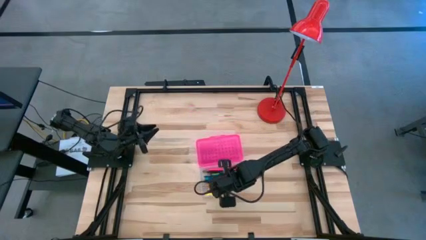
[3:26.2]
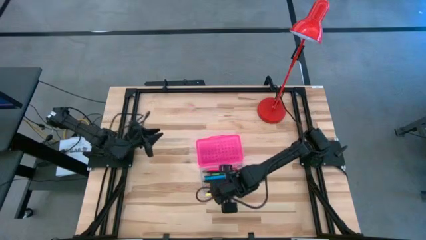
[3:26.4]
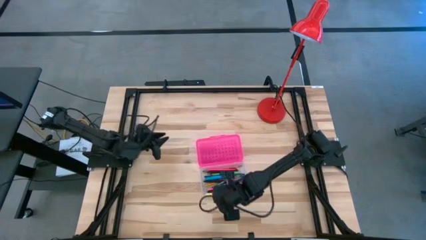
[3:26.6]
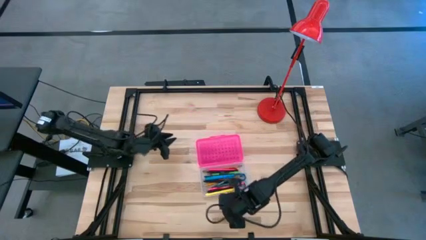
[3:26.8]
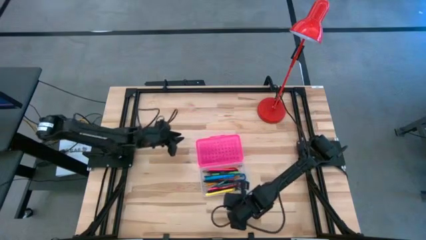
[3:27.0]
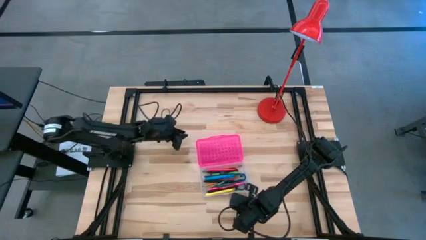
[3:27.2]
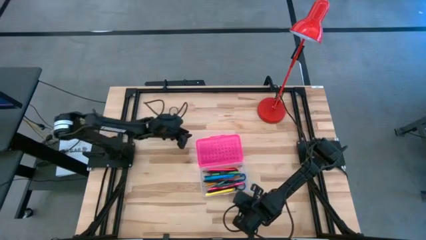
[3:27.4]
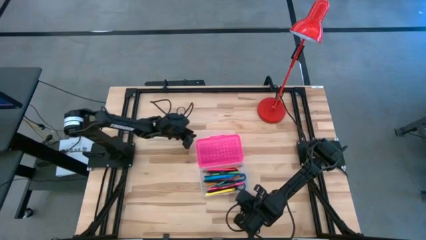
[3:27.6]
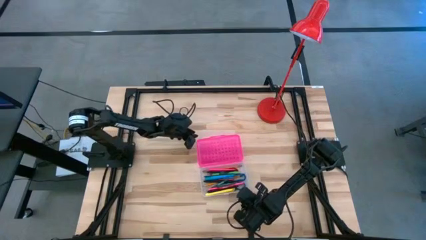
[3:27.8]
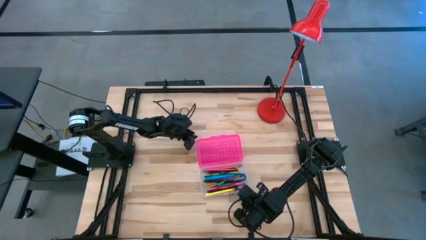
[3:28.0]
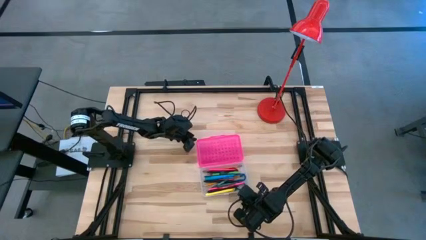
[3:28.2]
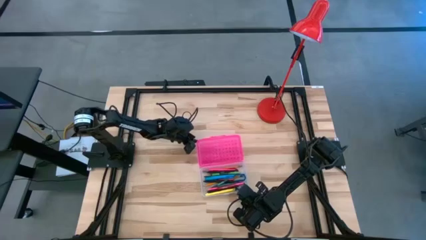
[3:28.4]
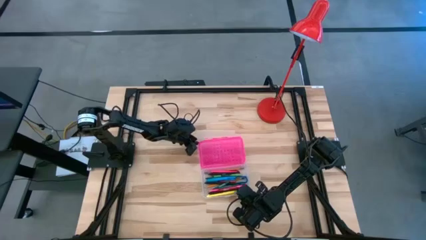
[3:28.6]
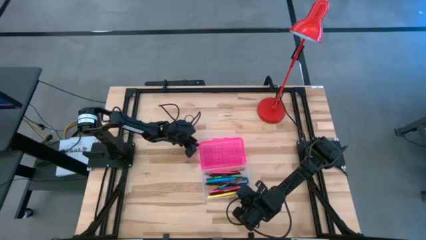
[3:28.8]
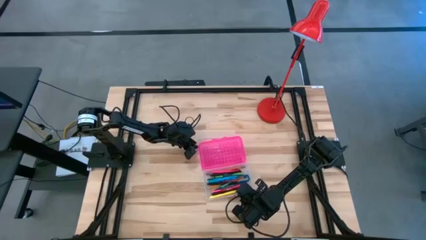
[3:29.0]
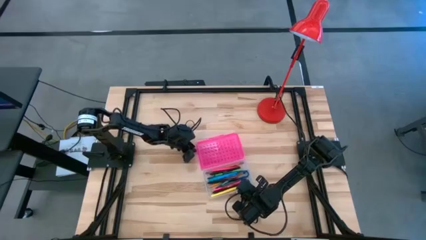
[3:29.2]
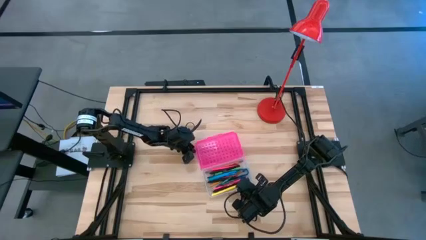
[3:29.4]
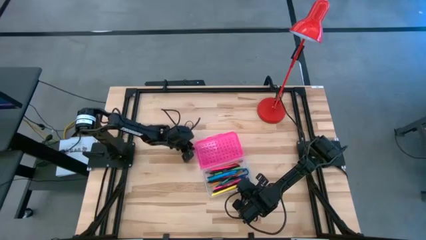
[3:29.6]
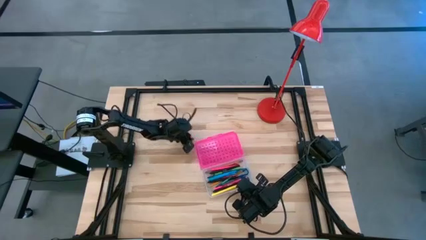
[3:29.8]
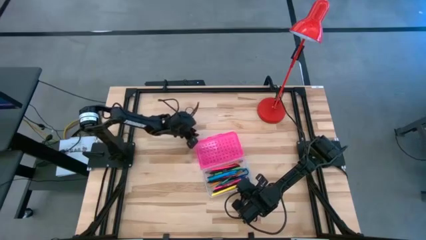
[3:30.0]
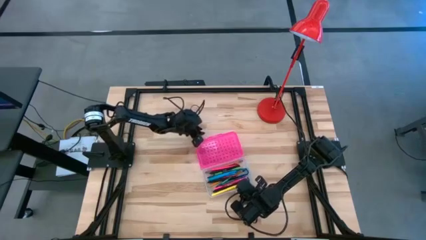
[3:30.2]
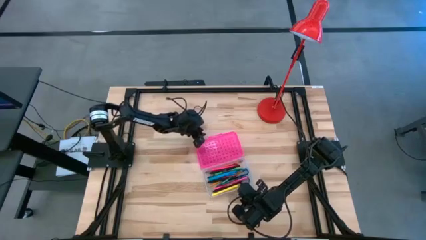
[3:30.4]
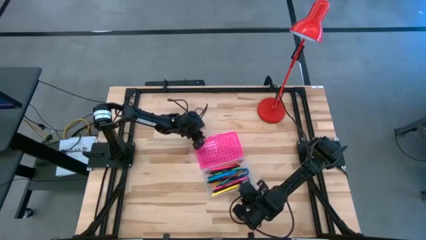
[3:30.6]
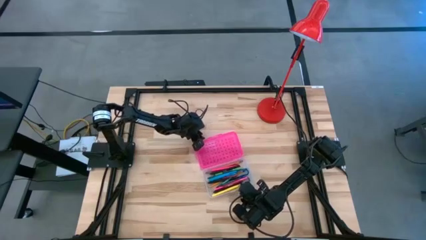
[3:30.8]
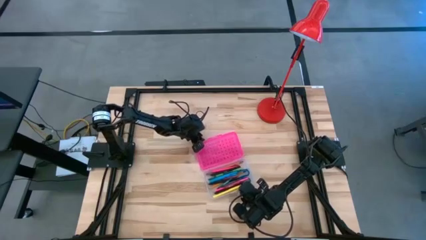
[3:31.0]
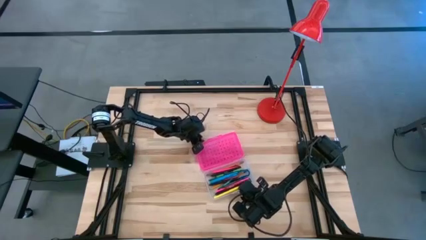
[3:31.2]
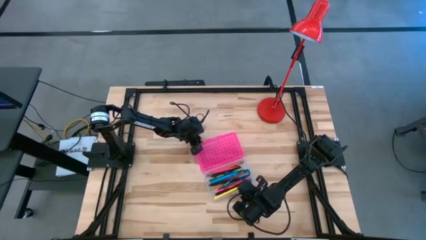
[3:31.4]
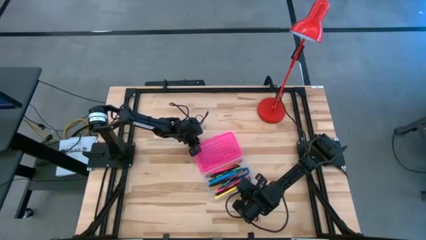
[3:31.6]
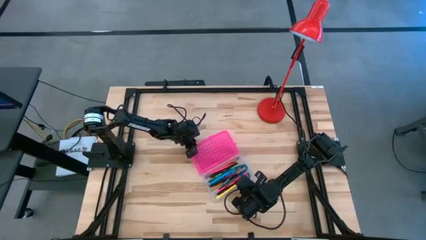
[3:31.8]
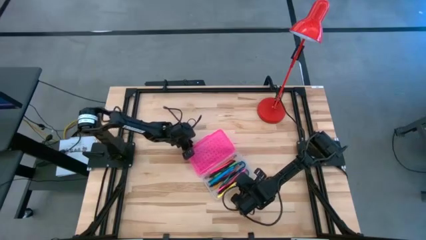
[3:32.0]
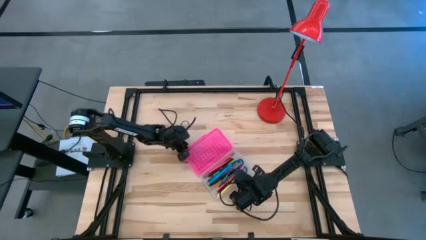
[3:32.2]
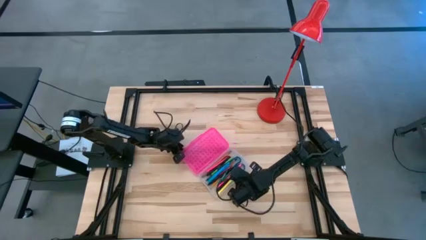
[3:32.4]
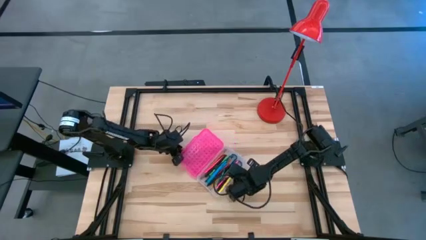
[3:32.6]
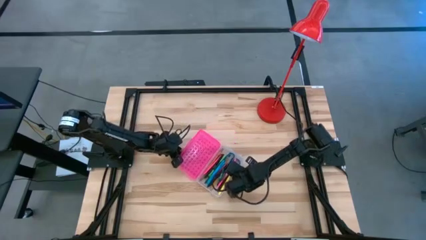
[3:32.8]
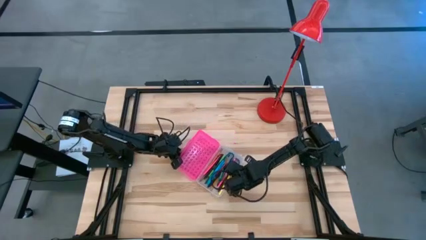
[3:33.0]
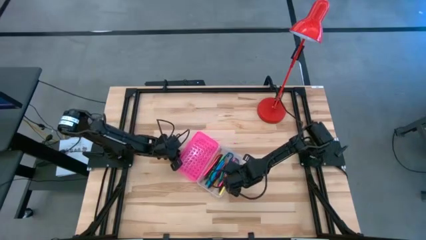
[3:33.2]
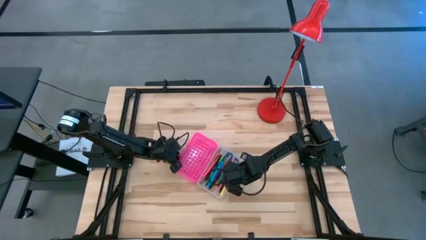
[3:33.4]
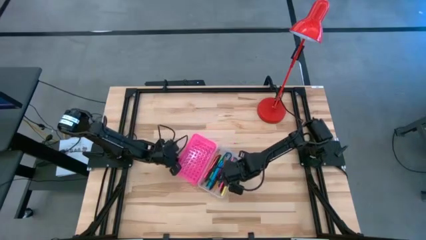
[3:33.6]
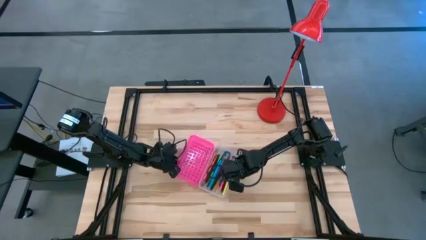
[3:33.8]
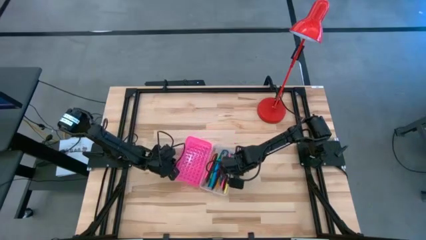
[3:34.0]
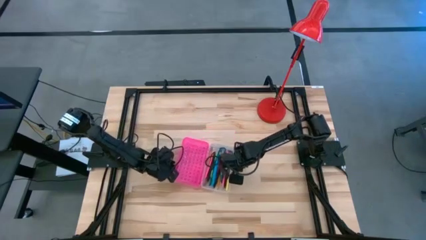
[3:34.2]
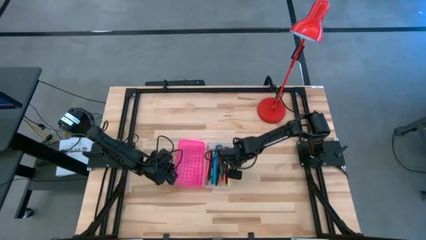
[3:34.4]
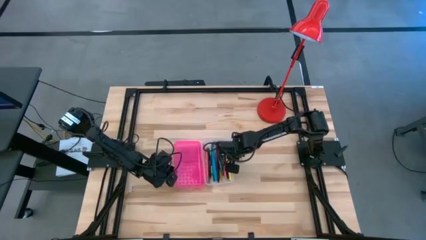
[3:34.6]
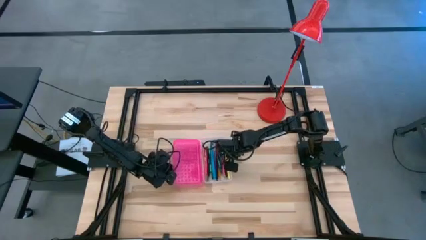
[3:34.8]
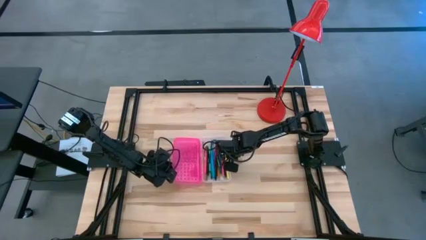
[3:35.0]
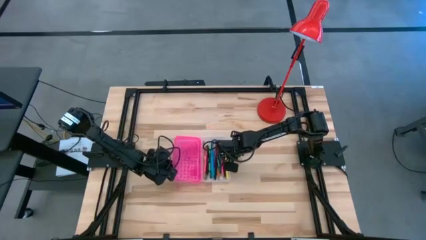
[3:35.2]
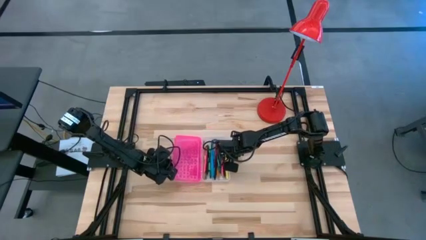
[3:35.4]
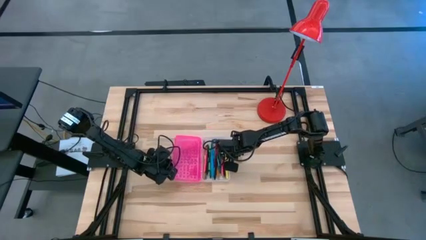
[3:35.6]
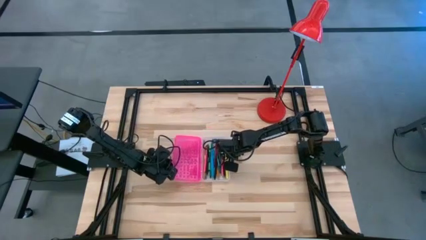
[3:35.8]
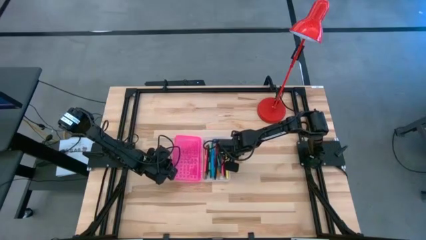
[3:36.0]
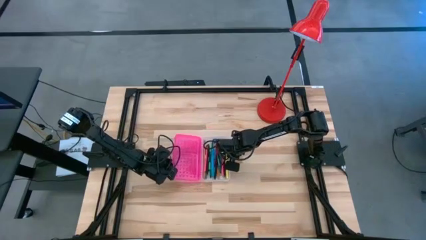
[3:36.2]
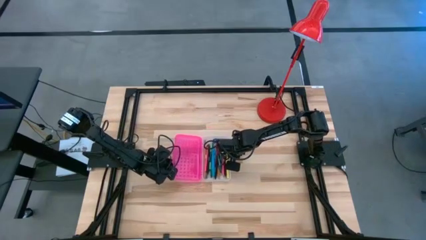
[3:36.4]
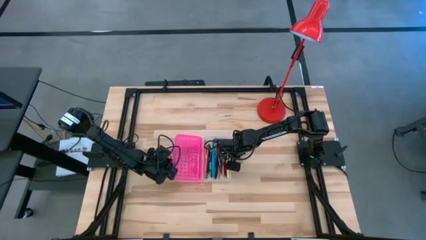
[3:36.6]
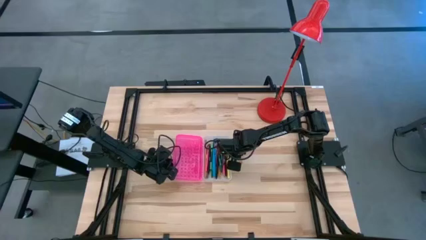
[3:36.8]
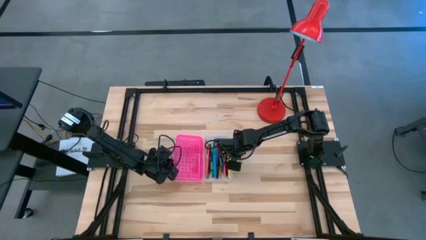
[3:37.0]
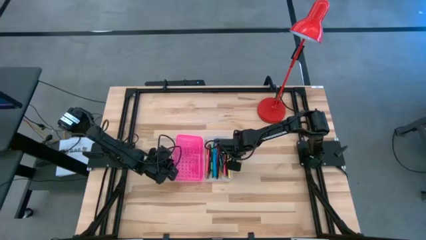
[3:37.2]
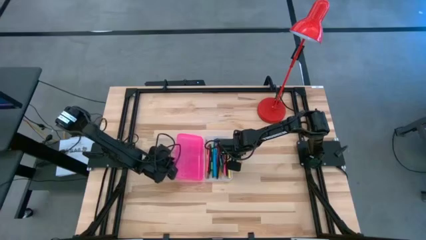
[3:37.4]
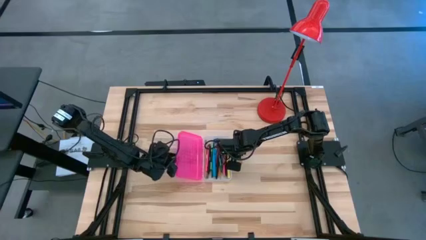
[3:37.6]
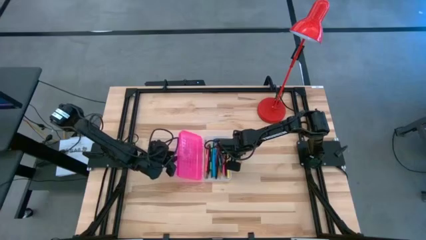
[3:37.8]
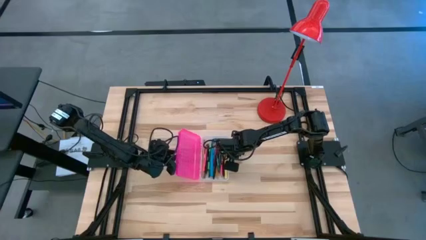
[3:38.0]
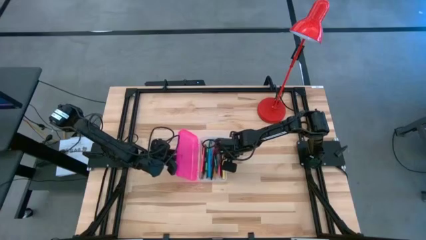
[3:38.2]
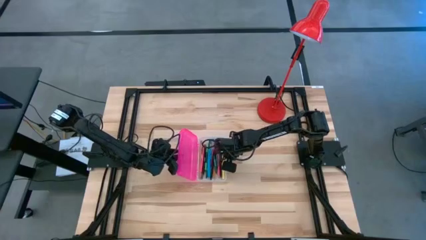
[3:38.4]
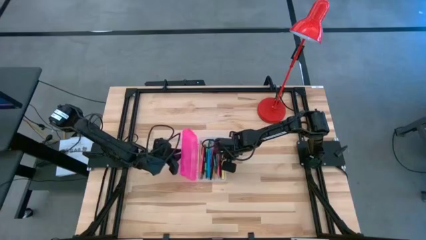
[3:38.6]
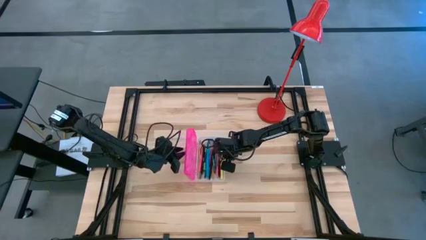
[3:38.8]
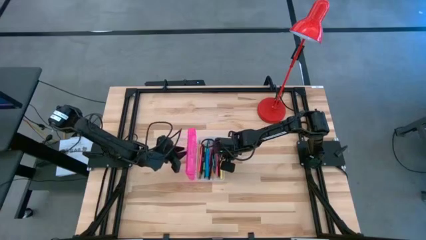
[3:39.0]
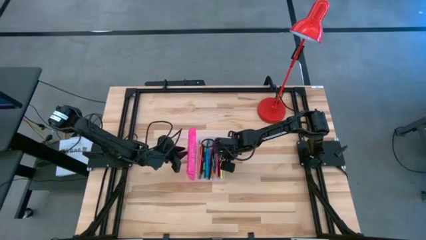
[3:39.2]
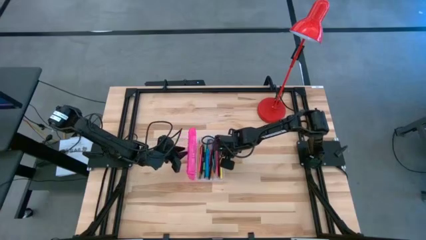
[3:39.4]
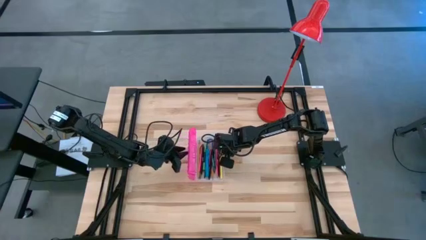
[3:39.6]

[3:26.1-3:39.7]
Task: Pick & place school supplies into a supply box
Close the pink supply box

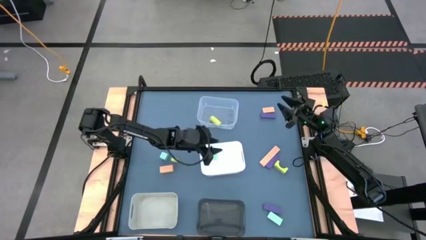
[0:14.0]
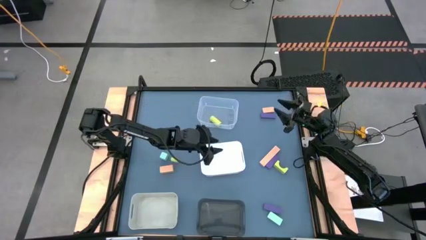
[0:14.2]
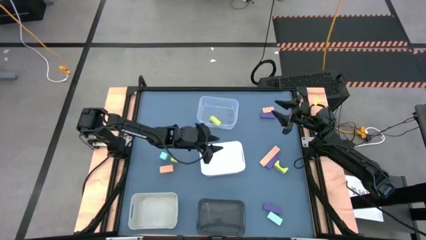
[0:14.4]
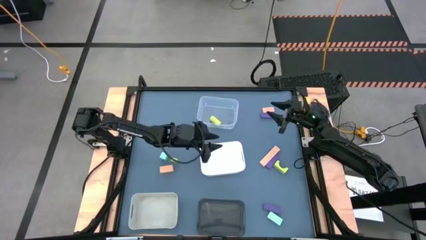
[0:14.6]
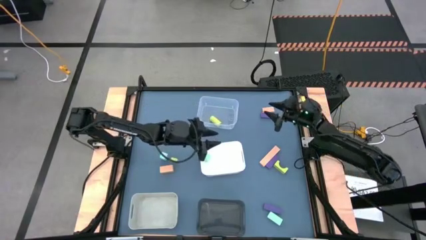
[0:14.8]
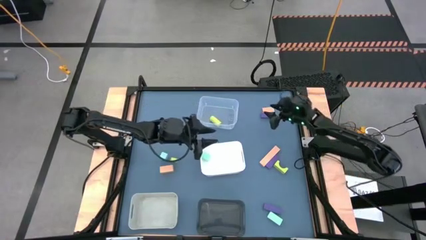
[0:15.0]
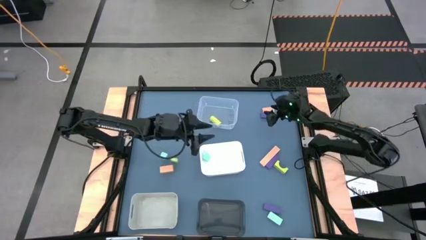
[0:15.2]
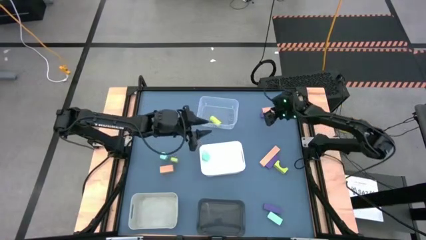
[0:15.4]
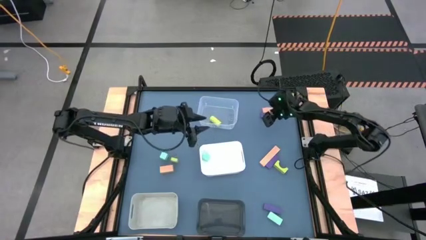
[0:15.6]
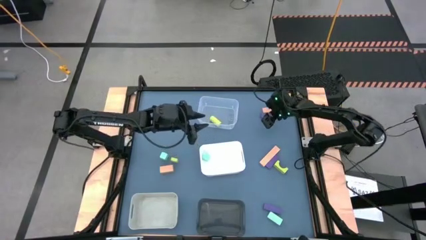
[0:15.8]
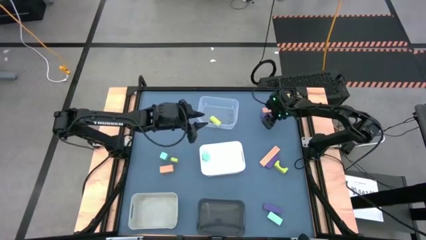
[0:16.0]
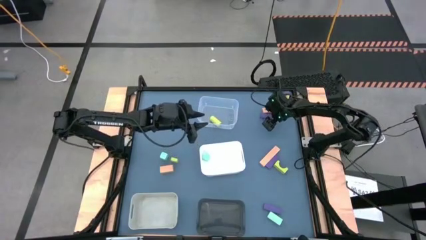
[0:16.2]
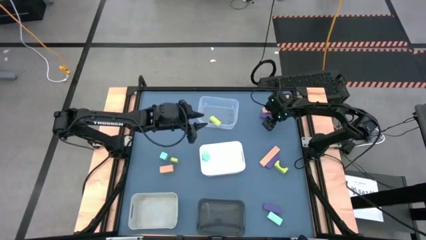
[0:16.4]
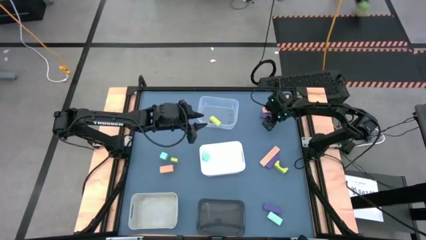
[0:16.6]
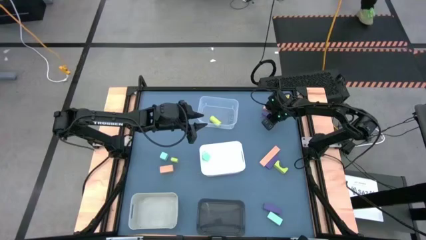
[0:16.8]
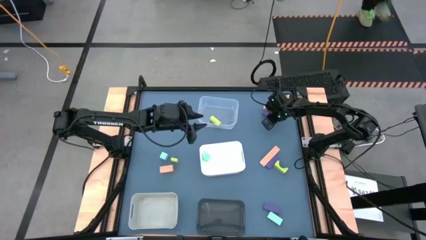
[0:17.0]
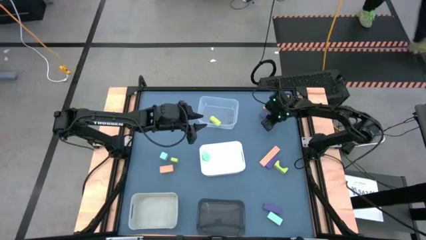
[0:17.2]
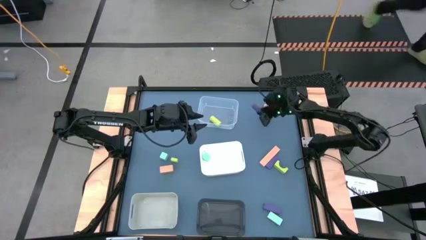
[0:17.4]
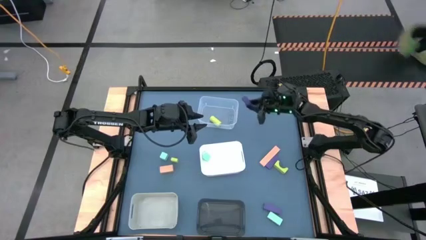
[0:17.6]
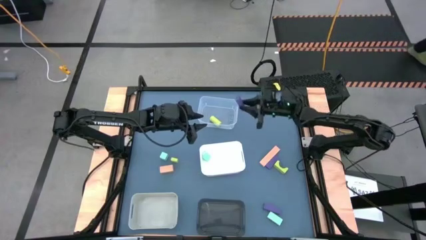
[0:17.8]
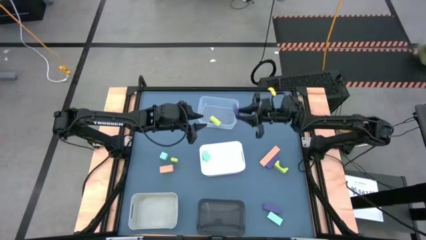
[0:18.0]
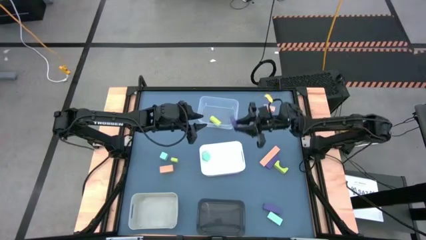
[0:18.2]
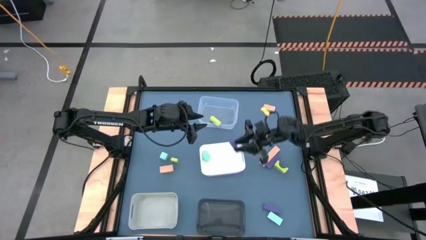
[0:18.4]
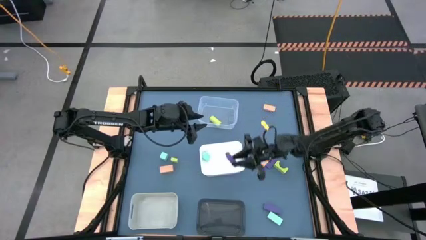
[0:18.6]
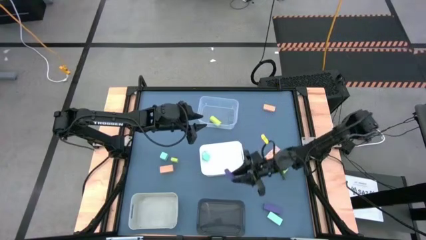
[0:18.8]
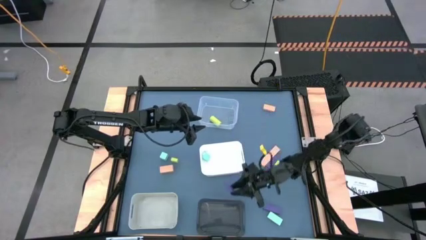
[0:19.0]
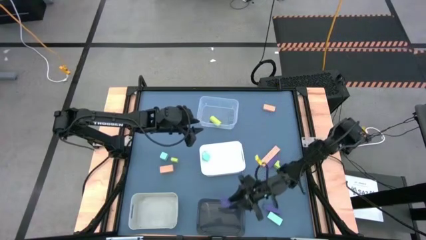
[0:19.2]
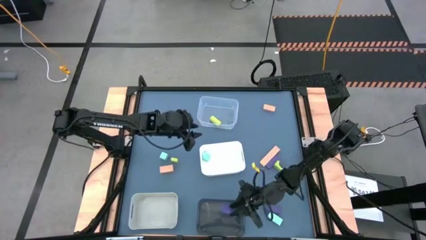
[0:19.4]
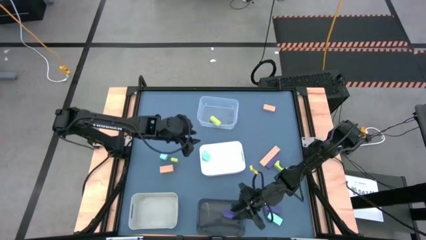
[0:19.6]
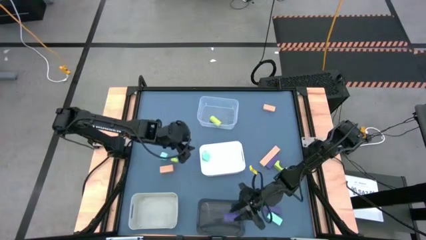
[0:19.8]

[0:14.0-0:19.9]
Task: Sort & place blocks by color
Put the top violet block into the black bin
